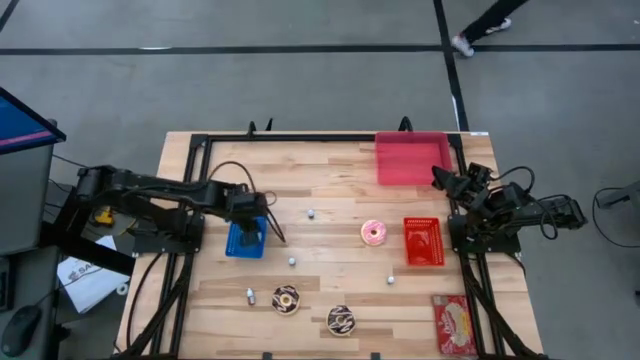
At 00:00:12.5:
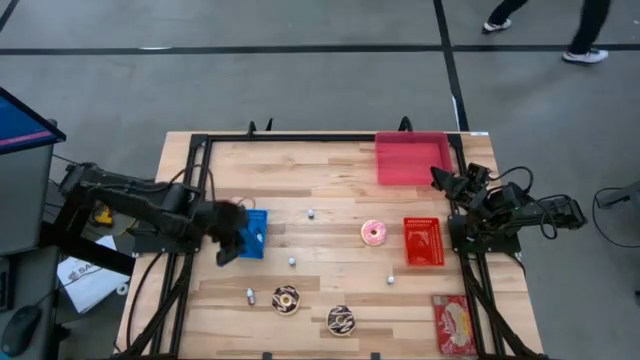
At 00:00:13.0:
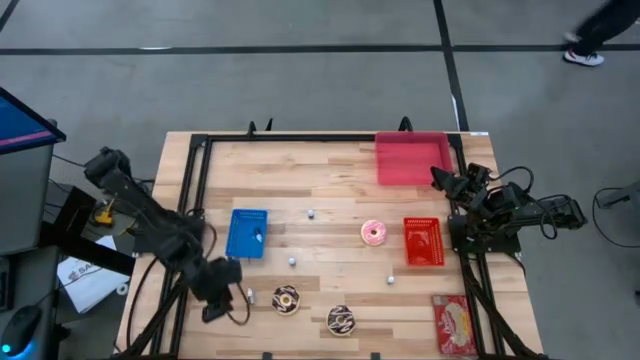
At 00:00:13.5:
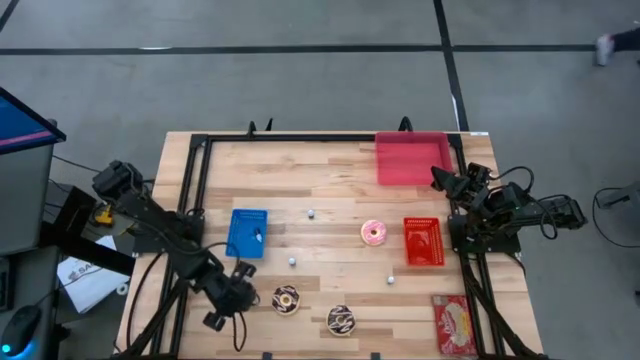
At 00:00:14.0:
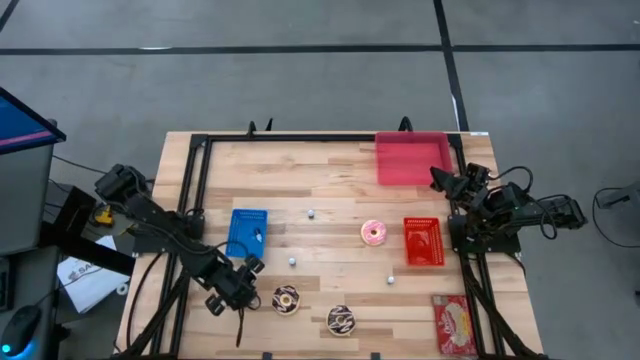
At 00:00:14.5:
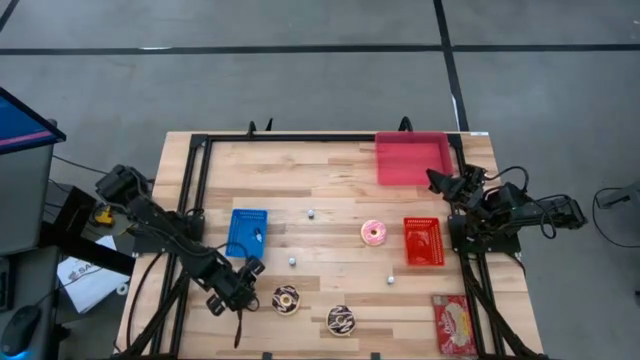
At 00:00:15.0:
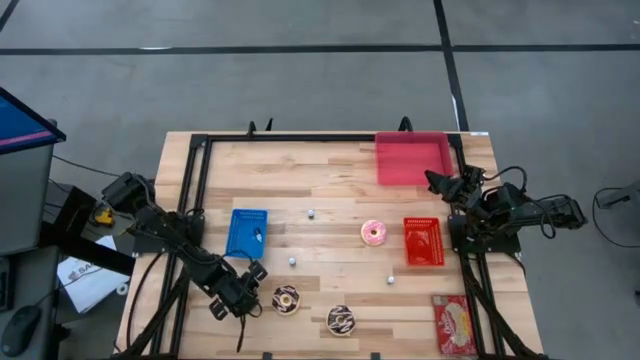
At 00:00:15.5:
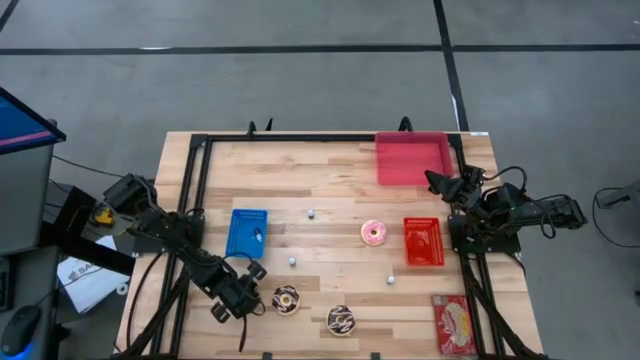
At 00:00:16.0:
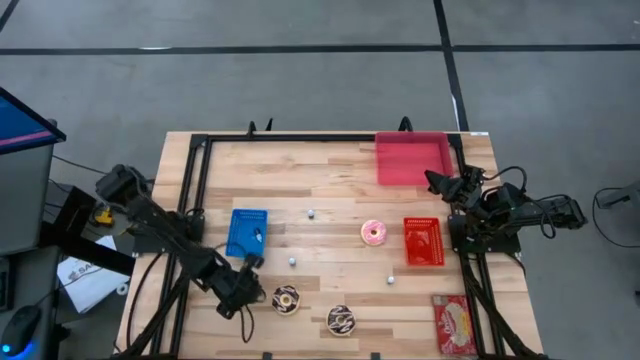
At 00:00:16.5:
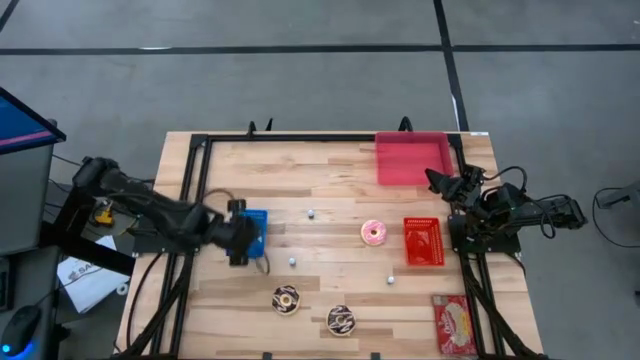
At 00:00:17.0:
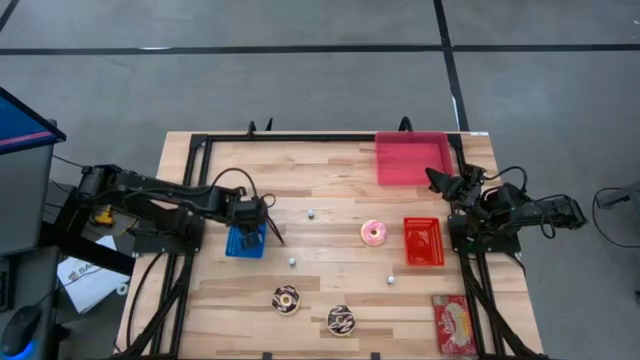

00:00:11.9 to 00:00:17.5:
Put the red food coloring bottle into the blue bin

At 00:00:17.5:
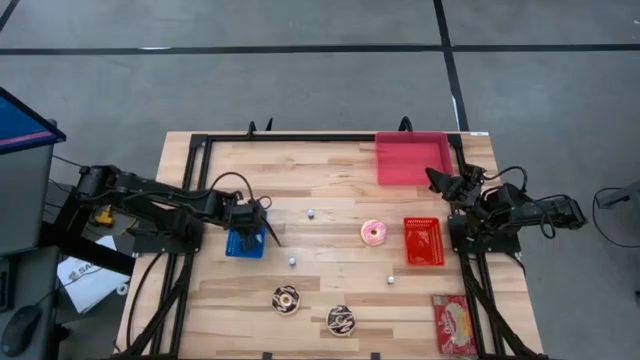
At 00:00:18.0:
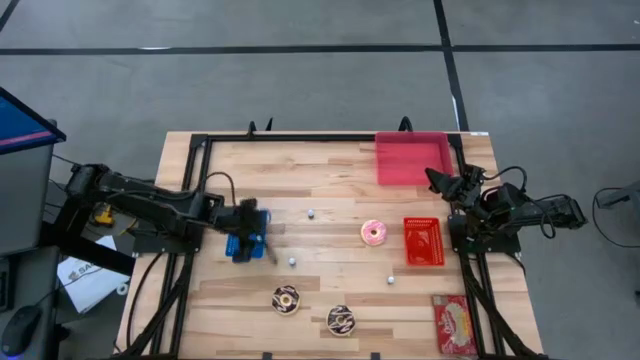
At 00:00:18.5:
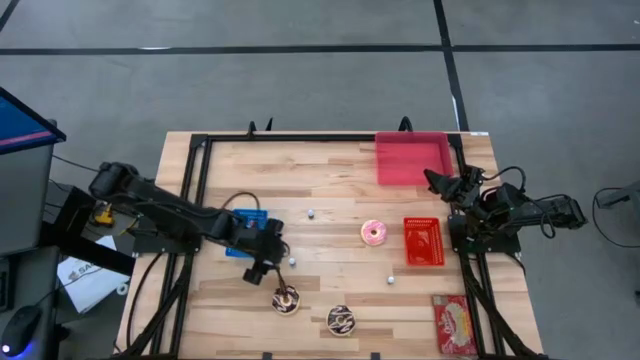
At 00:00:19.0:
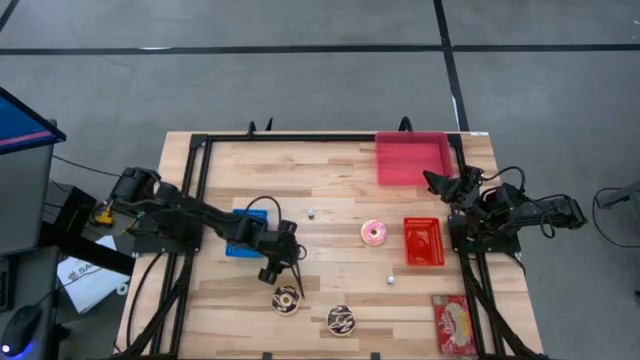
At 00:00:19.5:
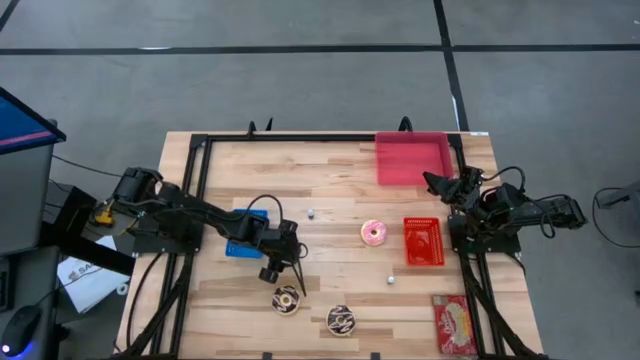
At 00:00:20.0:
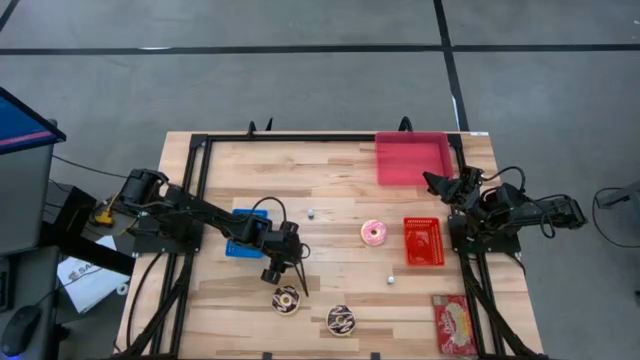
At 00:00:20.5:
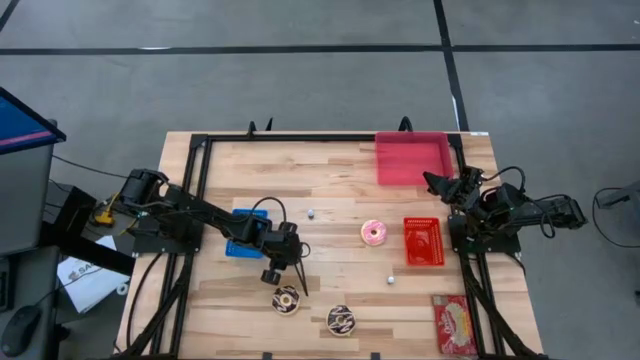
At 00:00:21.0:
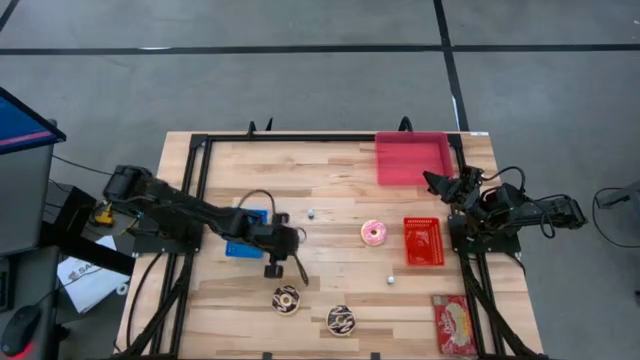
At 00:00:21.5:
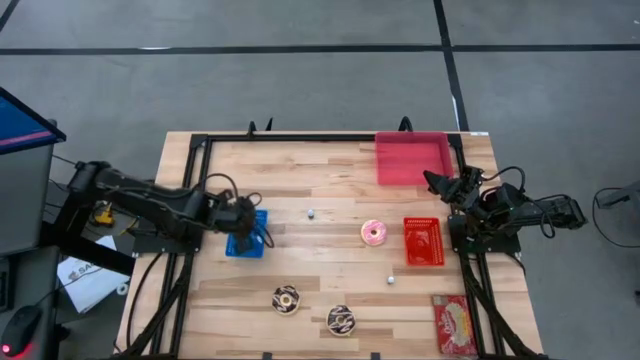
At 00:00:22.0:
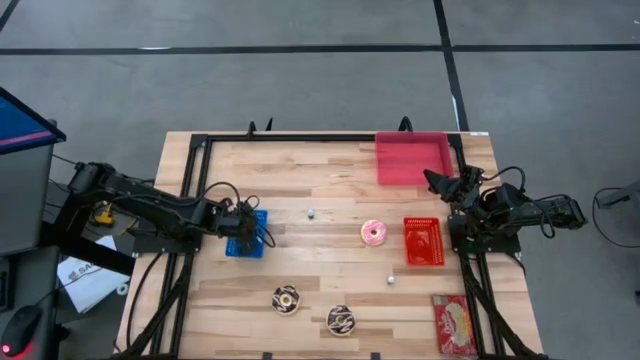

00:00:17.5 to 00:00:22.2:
Put the black food coloring bottle into the blue bin

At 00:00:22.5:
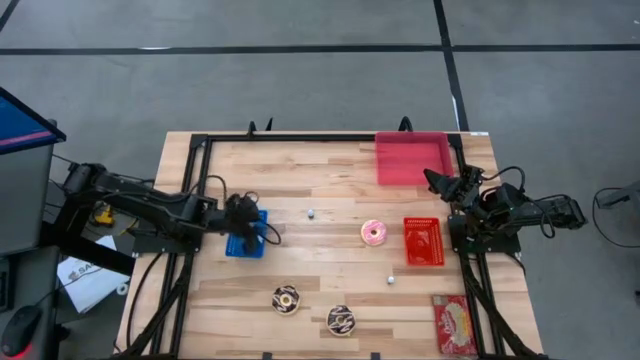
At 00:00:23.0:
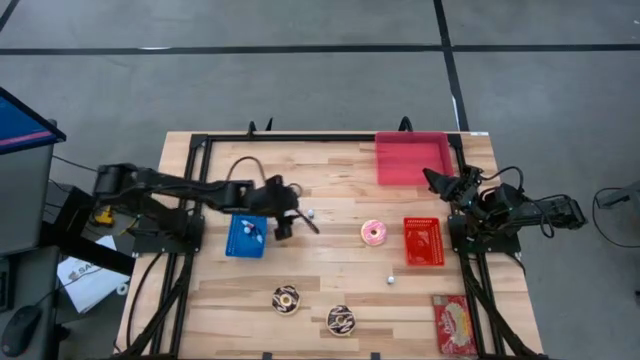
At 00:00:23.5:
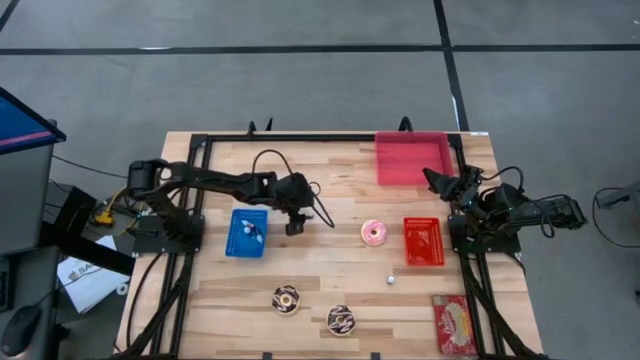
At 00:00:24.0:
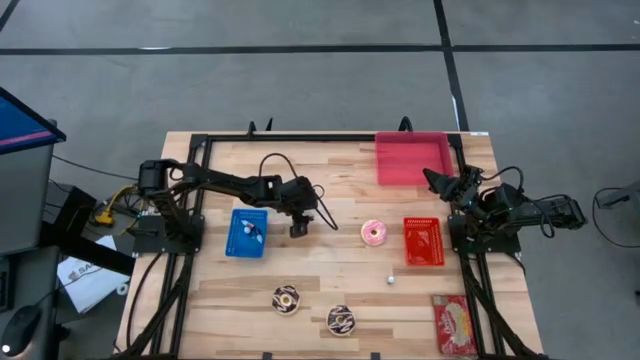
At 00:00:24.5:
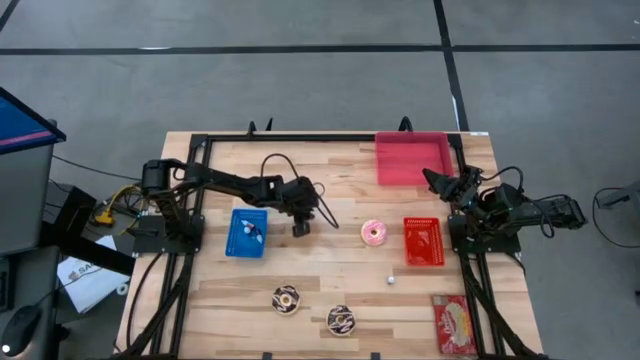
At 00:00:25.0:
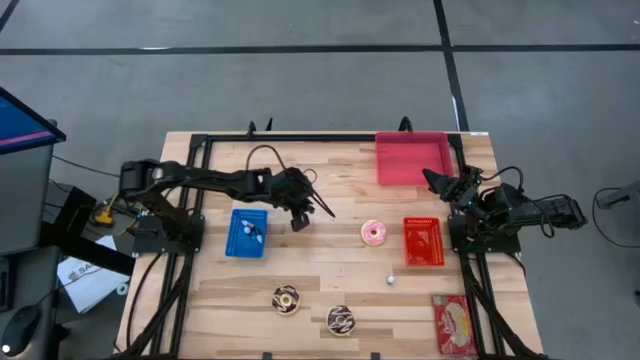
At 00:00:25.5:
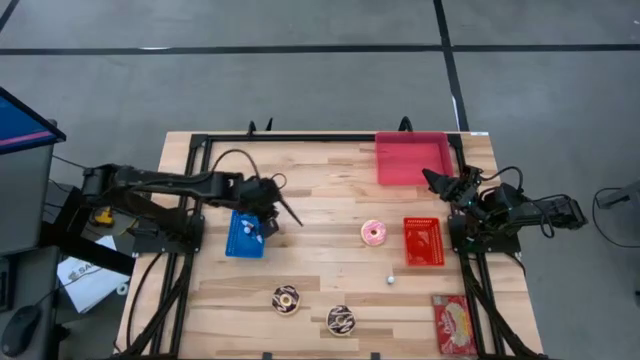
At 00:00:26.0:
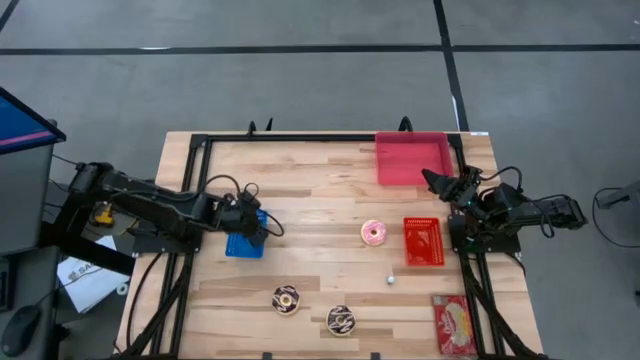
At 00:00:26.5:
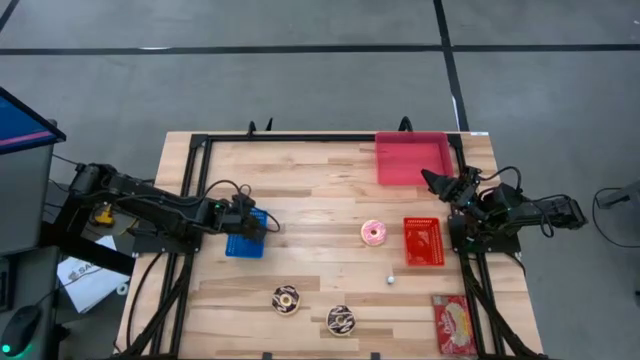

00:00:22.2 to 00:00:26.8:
Put the black food coloring bottle into the blue bin

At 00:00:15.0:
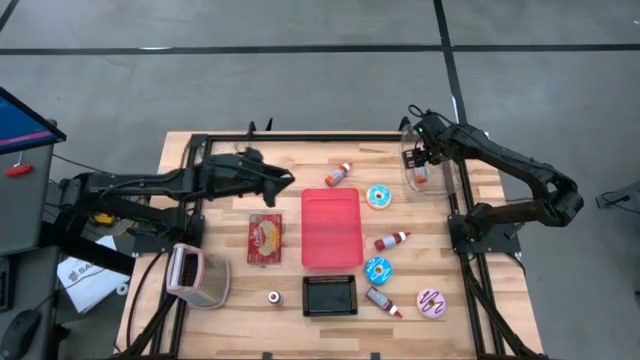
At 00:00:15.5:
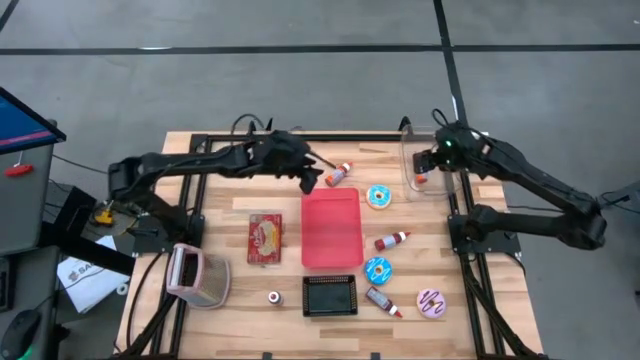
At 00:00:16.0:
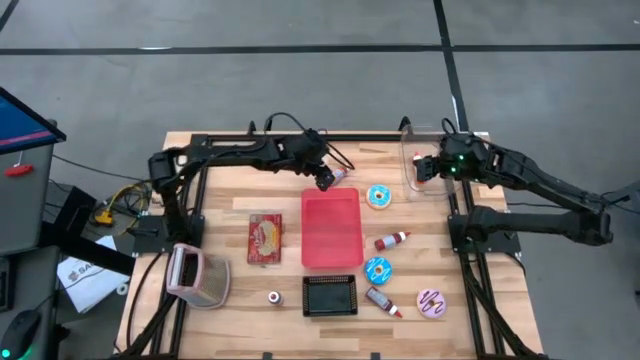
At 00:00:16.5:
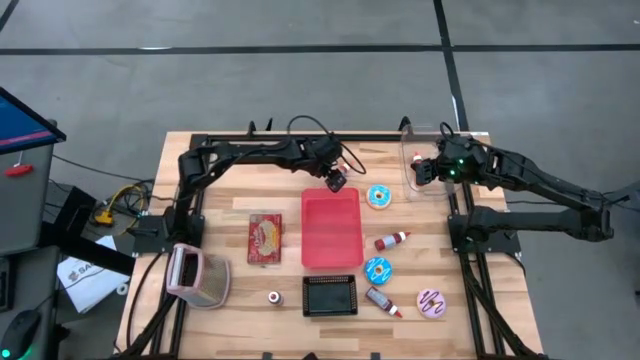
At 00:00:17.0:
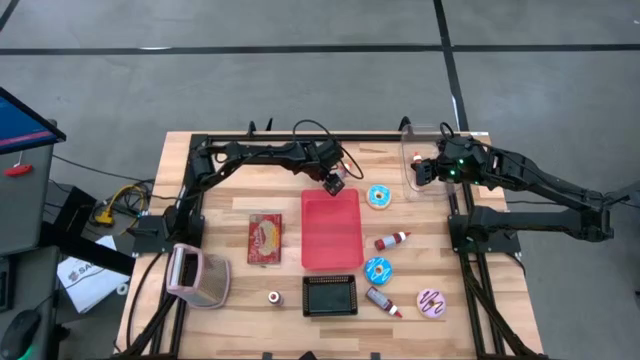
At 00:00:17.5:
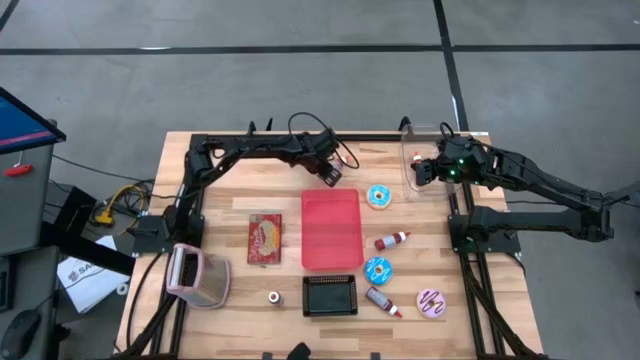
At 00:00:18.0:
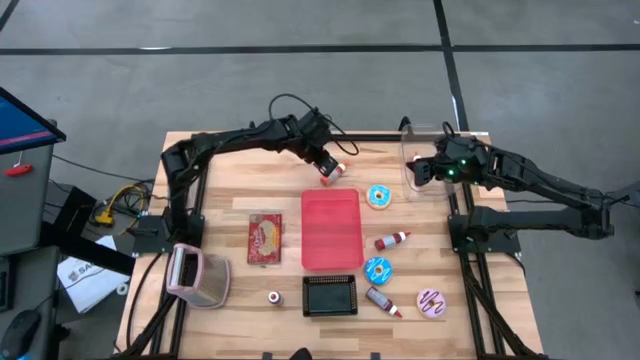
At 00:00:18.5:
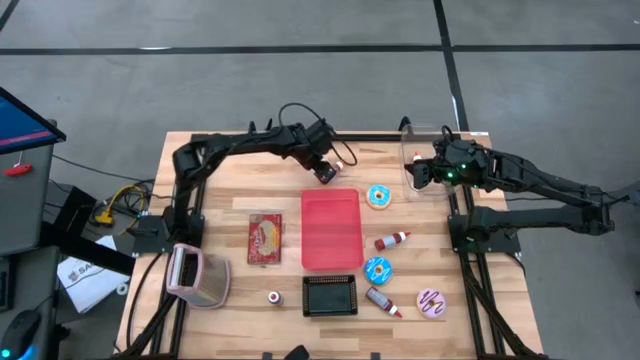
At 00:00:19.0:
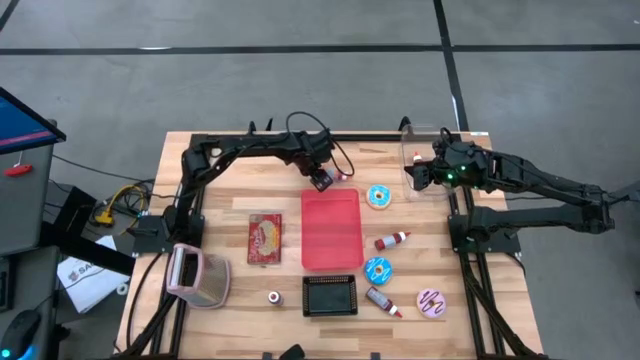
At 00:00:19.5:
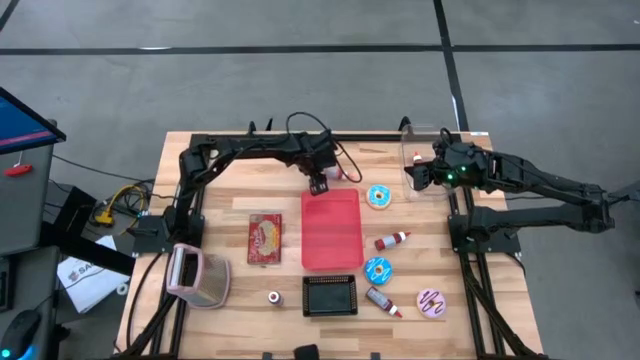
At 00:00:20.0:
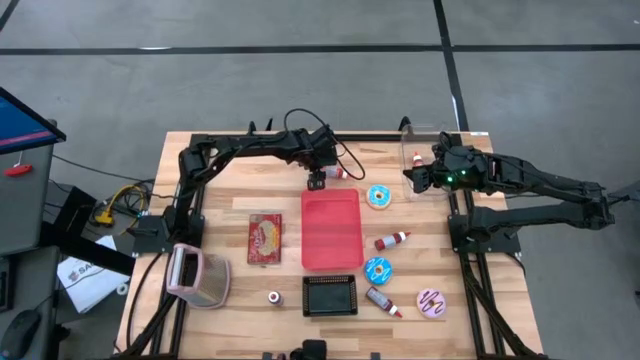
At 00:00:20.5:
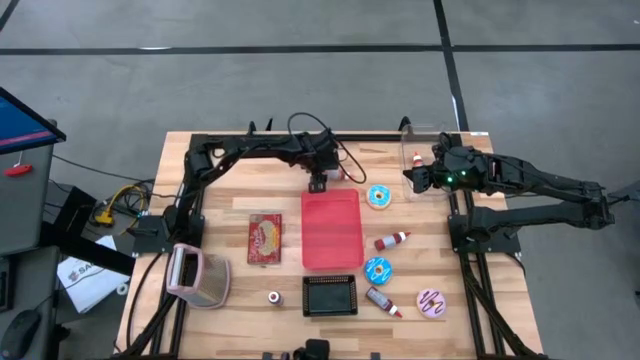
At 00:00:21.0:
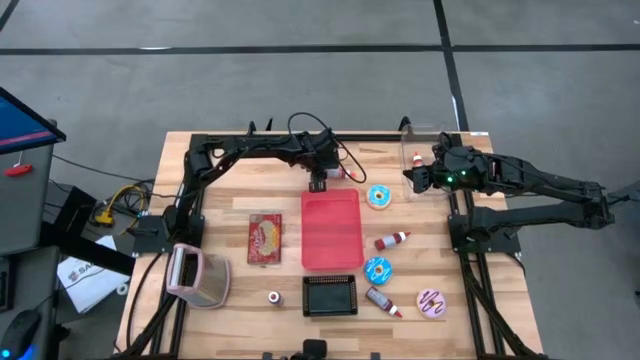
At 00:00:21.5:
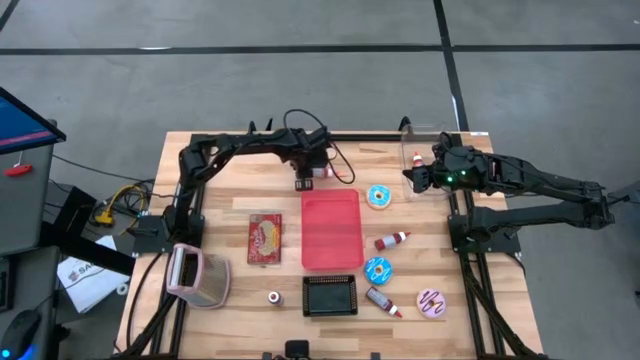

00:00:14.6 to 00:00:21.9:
Put the orange food coloring bottle into the transparent bin
